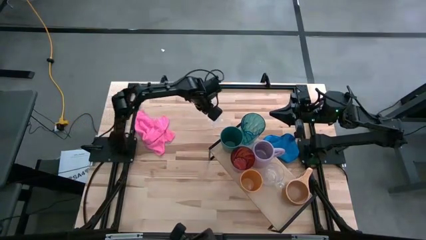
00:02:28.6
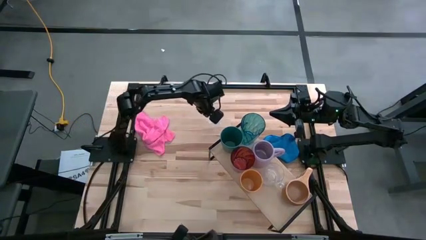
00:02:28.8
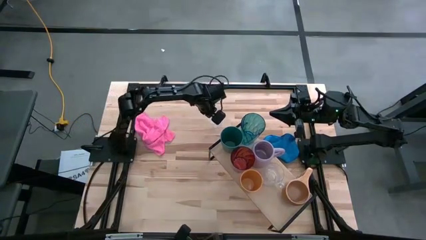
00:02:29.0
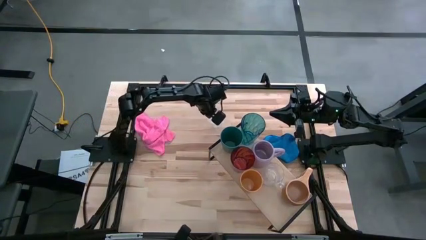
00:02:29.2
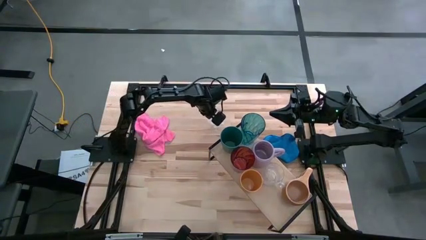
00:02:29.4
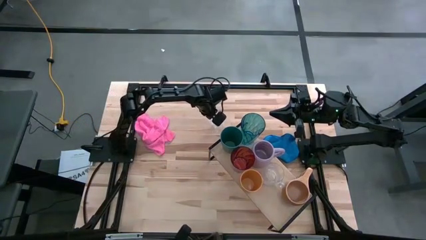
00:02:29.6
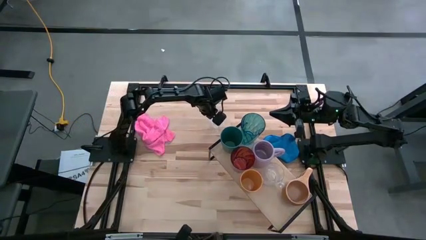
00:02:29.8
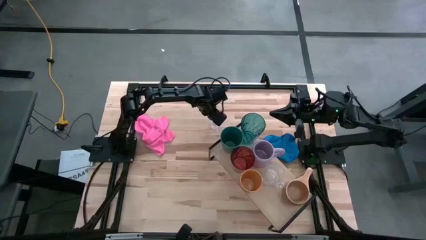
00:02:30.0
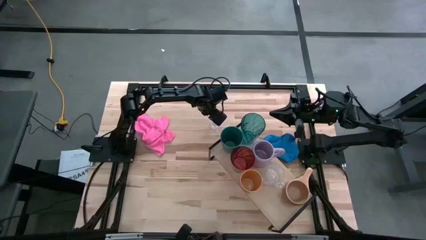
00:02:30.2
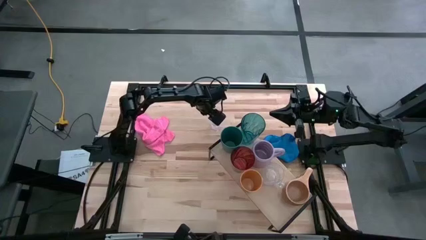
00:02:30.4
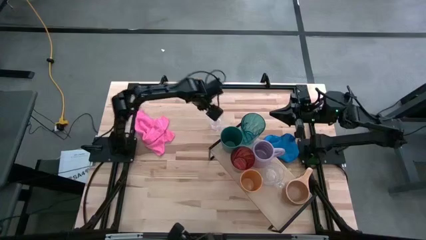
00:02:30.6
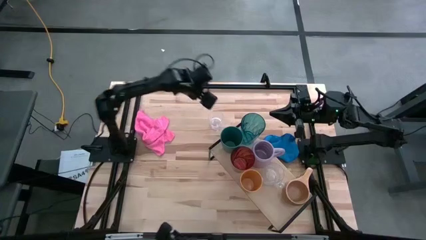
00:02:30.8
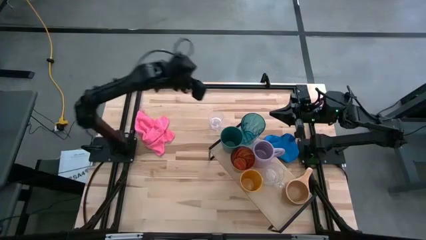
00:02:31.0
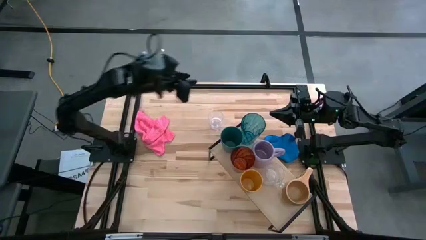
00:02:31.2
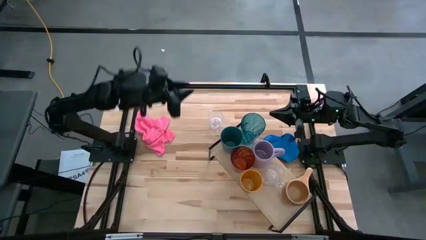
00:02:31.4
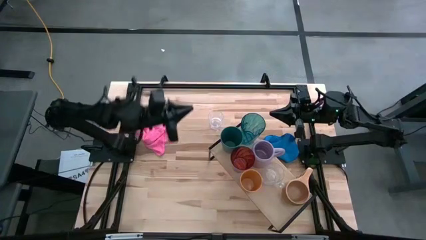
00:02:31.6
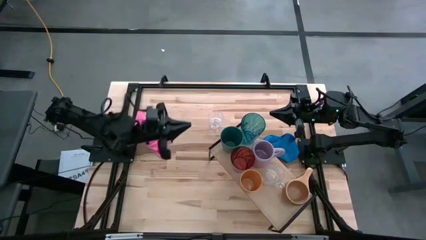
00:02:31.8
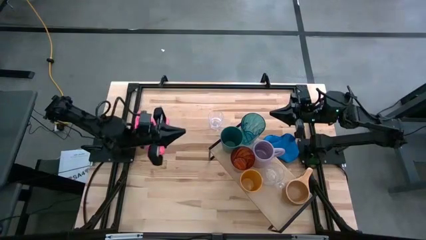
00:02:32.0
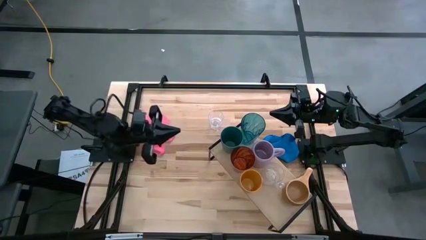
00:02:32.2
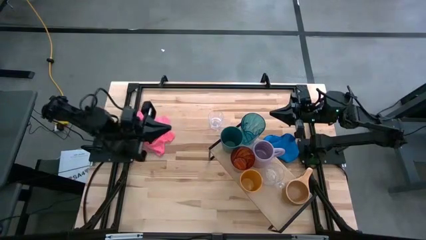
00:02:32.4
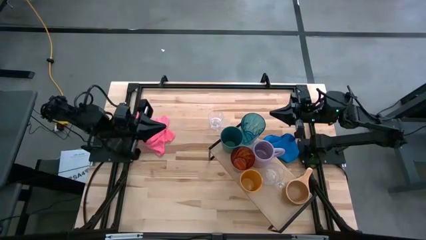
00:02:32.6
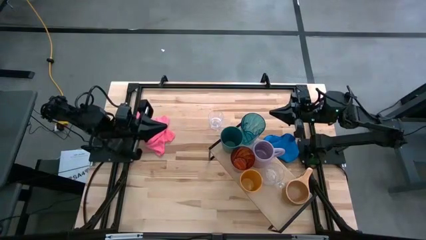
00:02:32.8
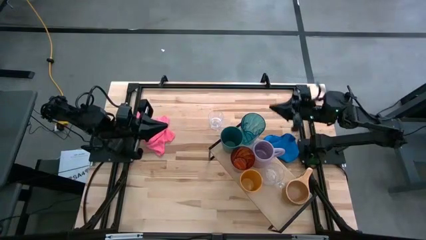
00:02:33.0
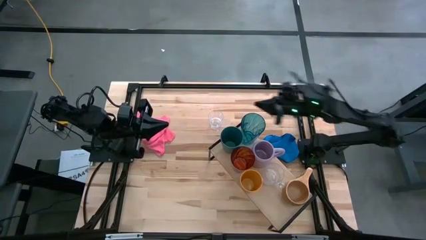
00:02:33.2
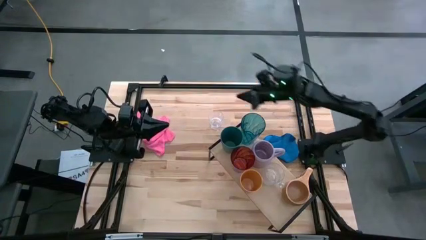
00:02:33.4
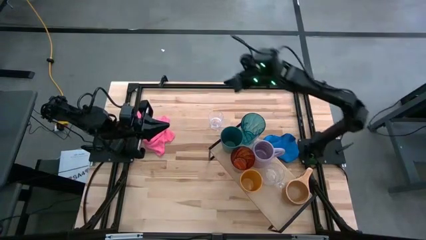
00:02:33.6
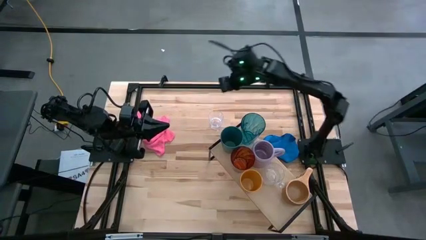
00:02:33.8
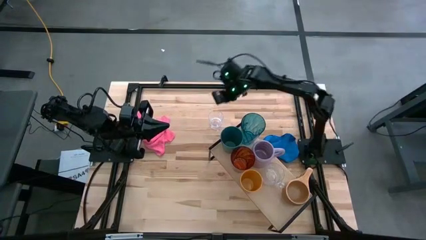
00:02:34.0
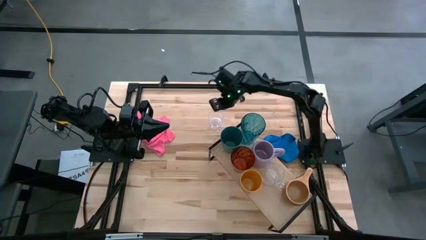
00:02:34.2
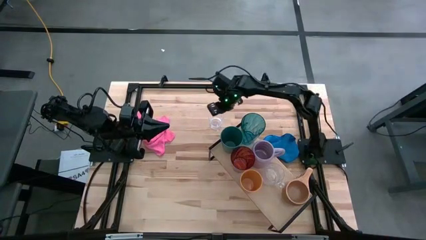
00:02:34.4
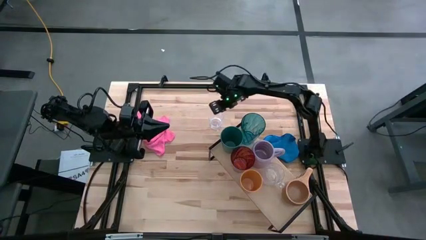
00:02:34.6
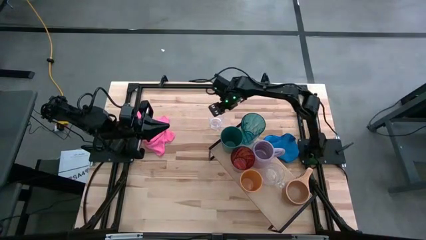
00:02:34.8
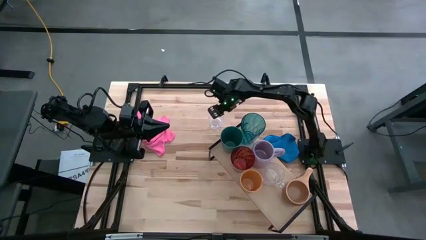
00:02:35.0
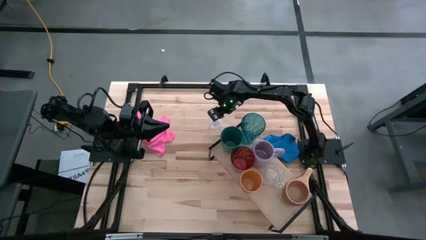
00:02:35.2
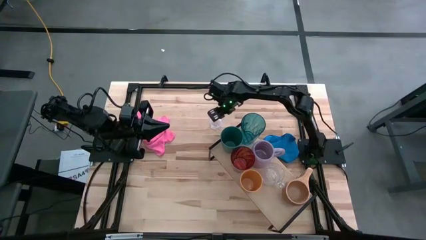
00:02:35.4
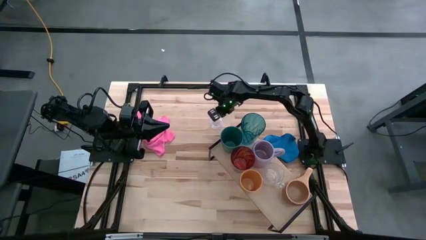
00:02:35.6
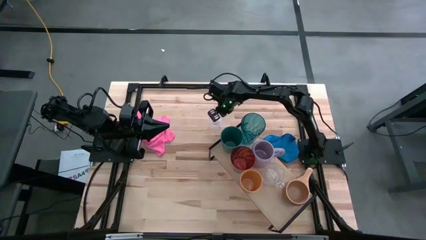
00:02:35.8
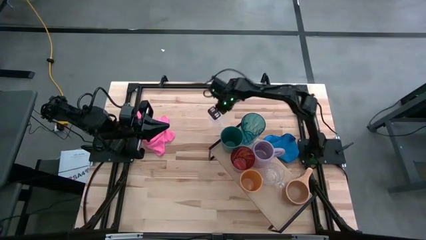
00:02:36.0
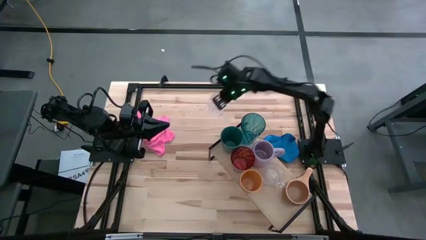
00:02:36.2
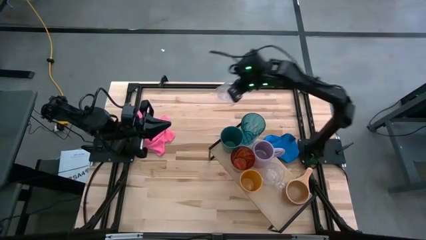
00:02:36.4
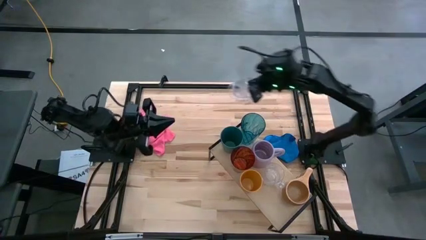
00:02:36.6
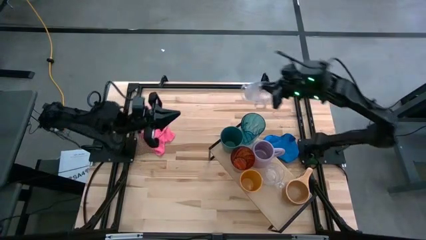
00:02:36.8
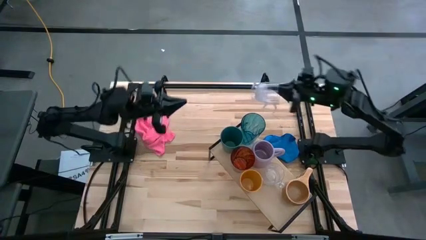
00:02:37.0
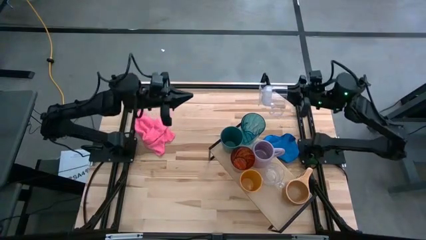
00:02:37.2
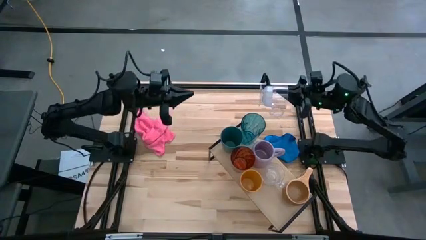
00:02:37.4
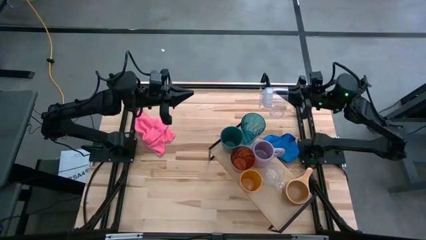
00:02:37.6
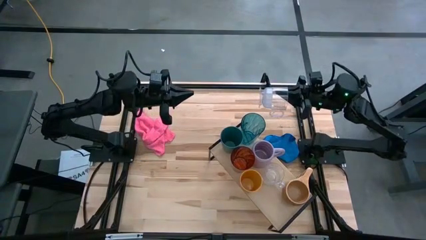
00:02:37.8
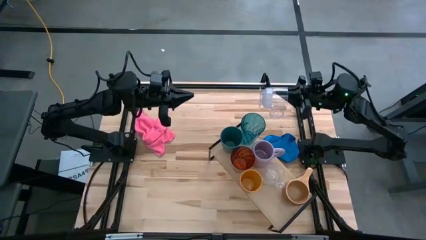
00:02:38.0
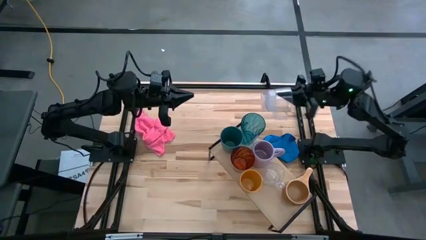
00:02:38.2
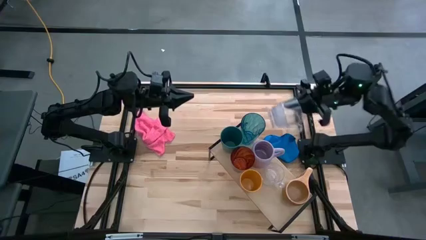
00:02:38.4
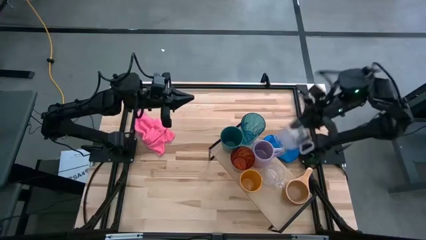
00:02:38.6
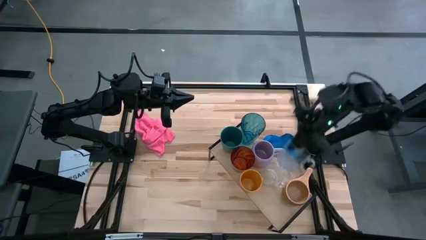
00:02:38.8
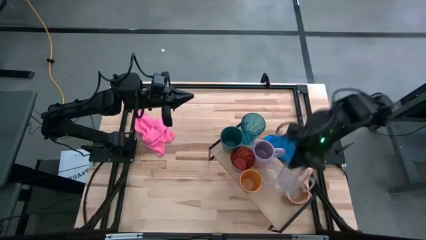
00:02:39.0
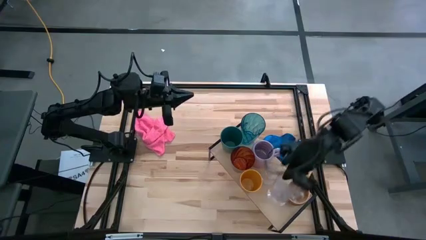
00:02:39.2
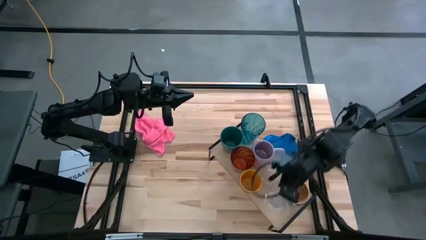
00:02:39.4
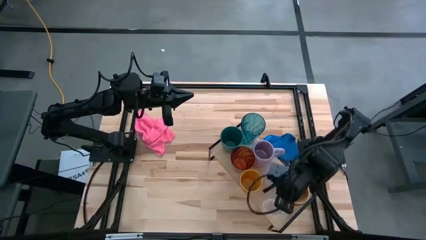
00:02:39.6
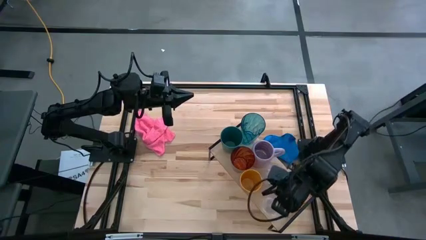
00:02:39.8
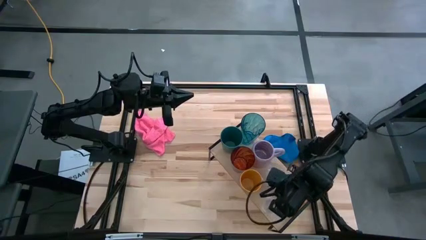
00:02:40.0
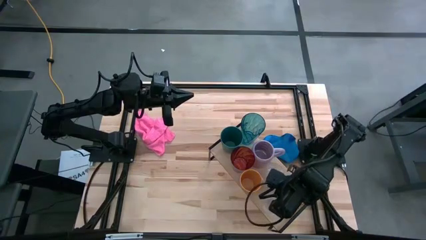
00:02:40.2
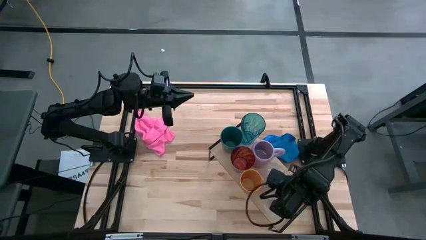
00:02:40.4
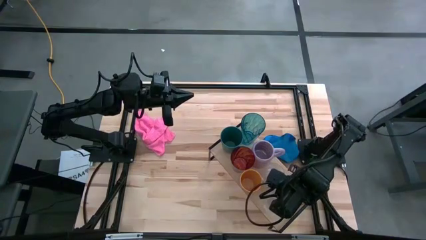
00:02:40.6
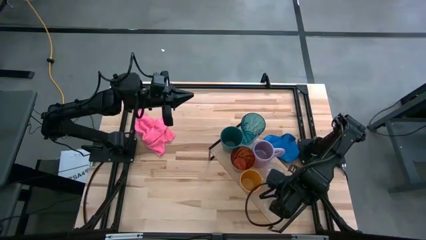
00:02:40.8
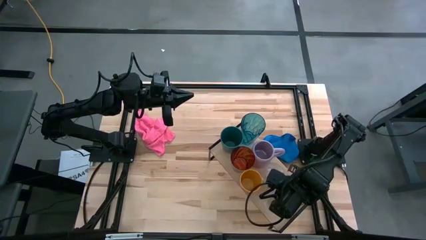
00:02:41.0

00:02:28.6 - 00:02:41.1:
Task: Stack small to large cups/mugs on shelf
Put the transparent mug on the shelf
